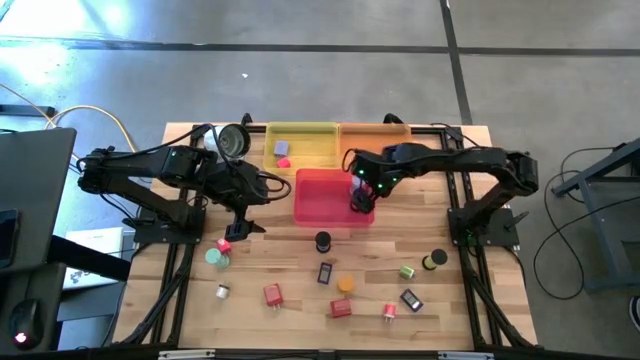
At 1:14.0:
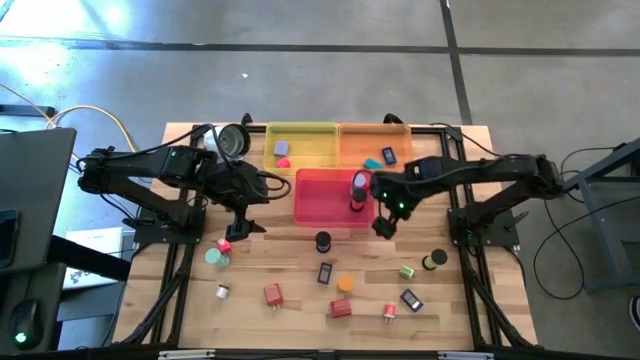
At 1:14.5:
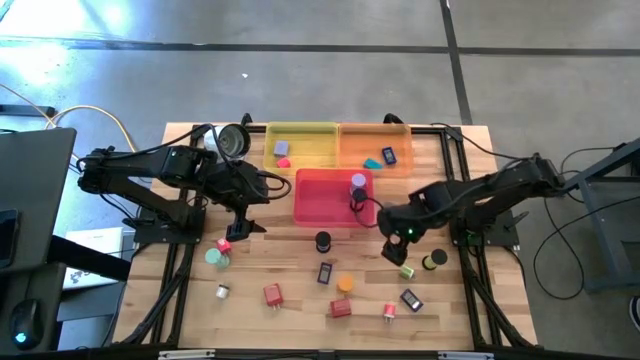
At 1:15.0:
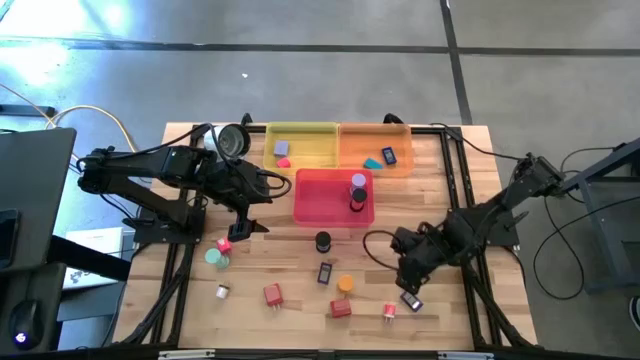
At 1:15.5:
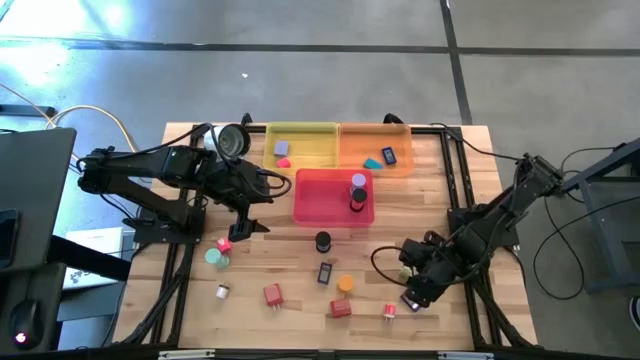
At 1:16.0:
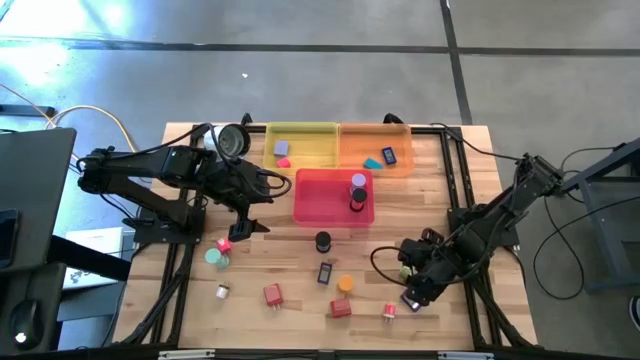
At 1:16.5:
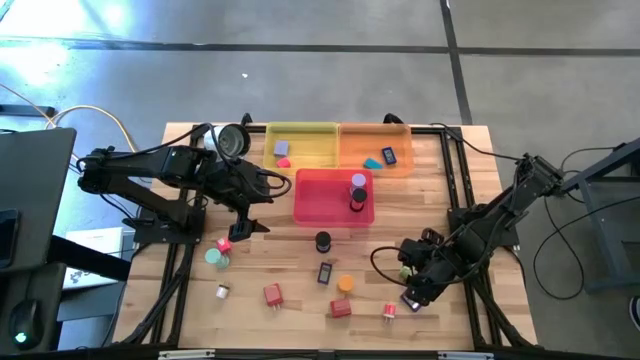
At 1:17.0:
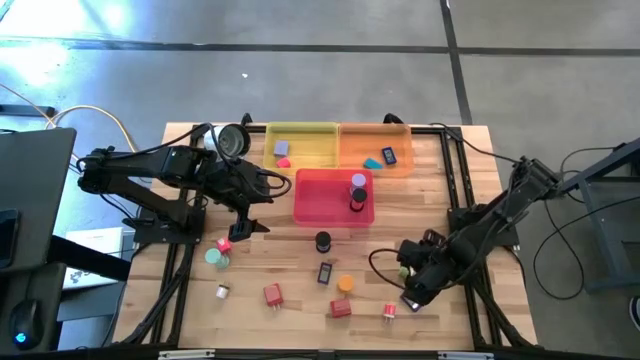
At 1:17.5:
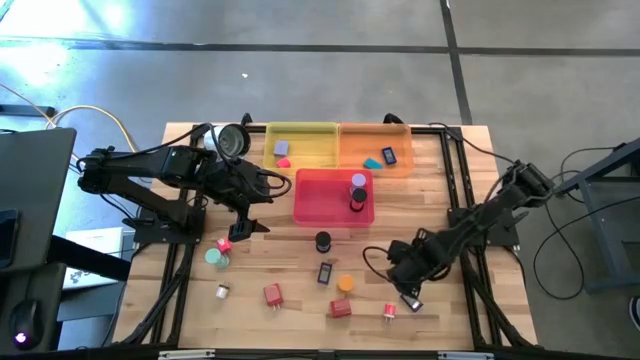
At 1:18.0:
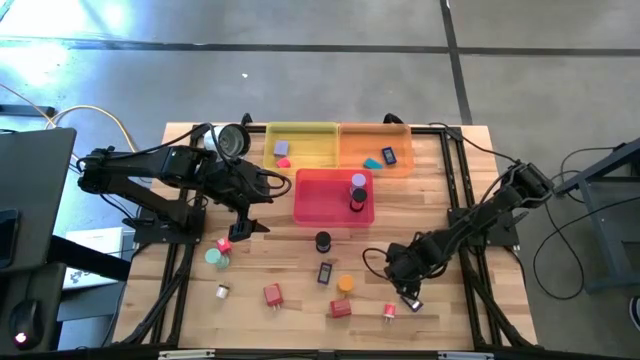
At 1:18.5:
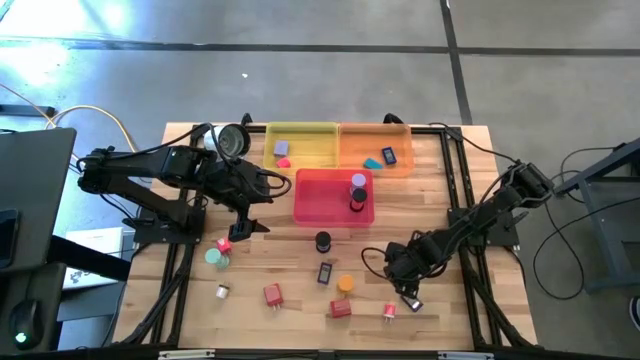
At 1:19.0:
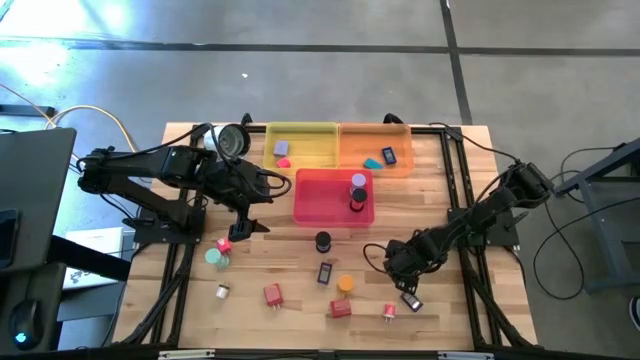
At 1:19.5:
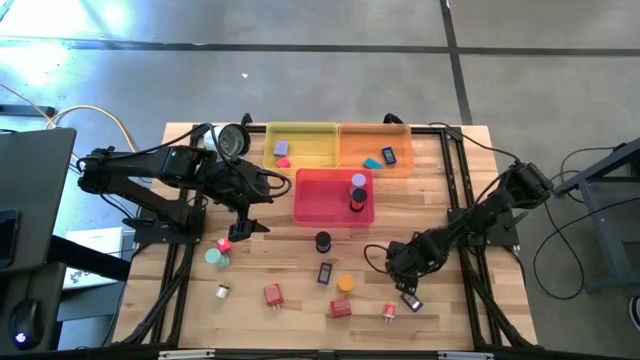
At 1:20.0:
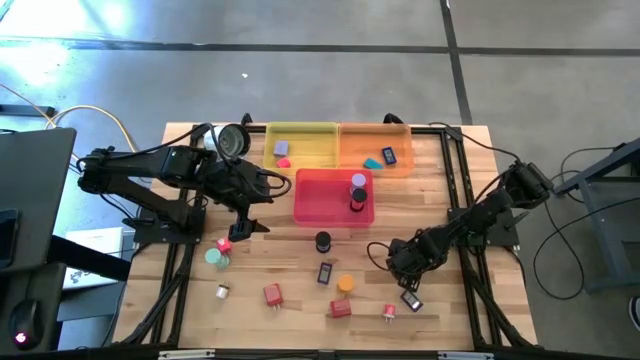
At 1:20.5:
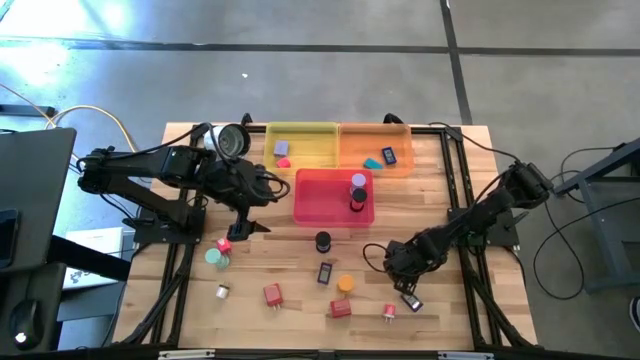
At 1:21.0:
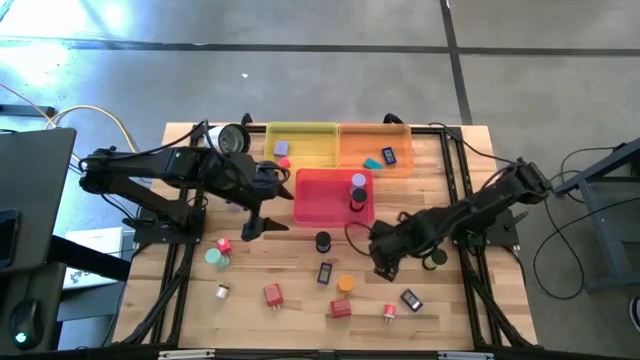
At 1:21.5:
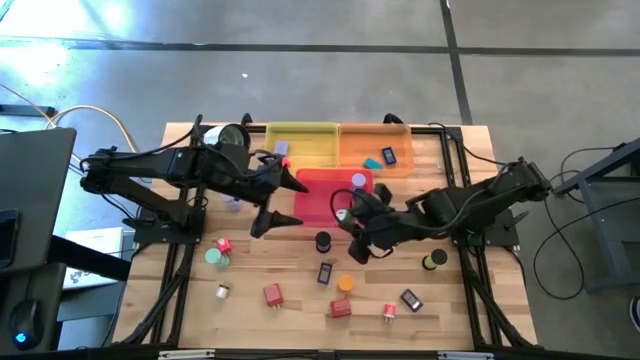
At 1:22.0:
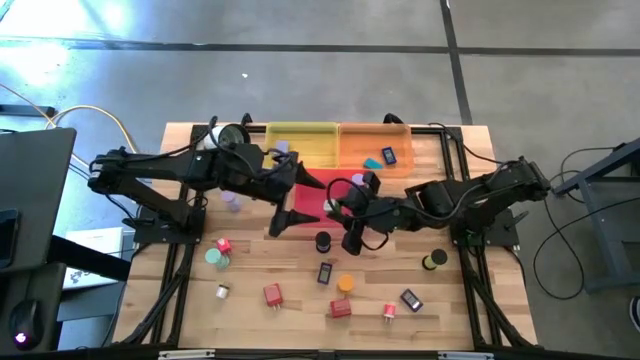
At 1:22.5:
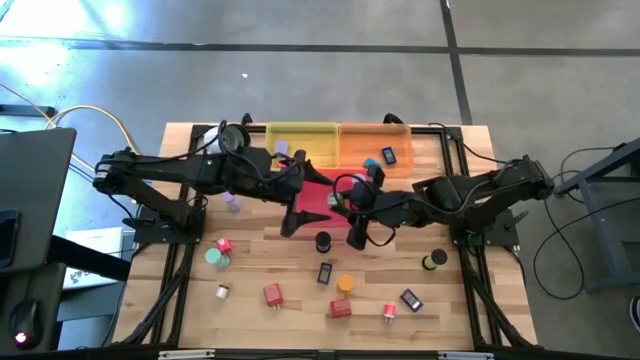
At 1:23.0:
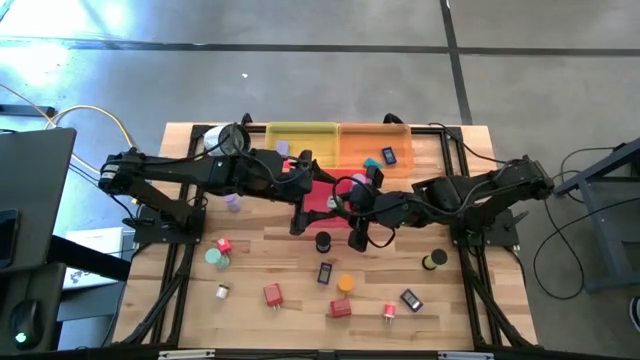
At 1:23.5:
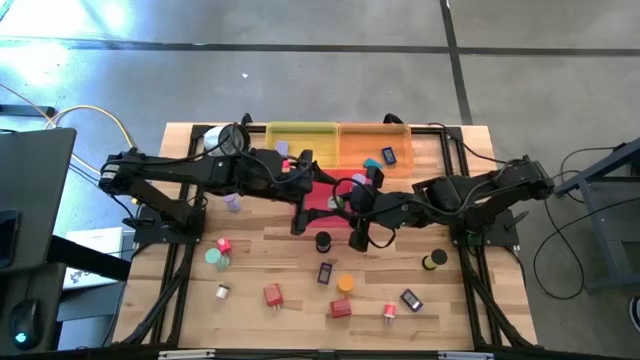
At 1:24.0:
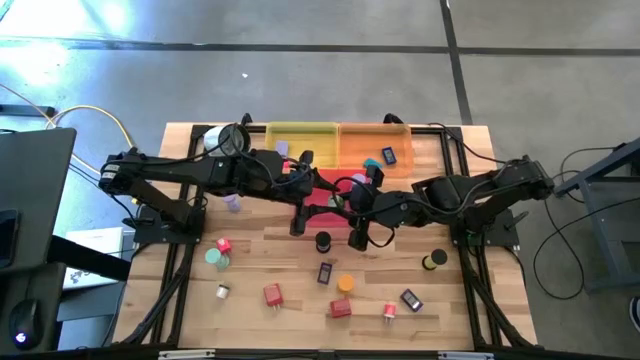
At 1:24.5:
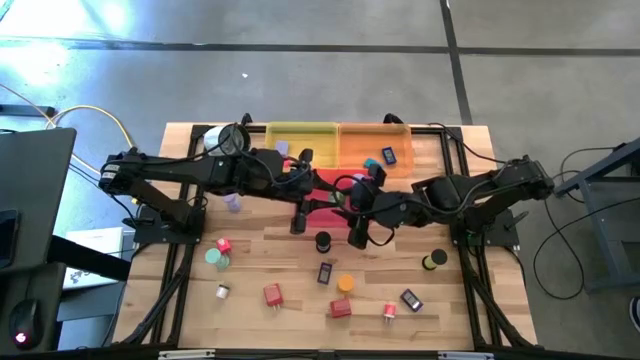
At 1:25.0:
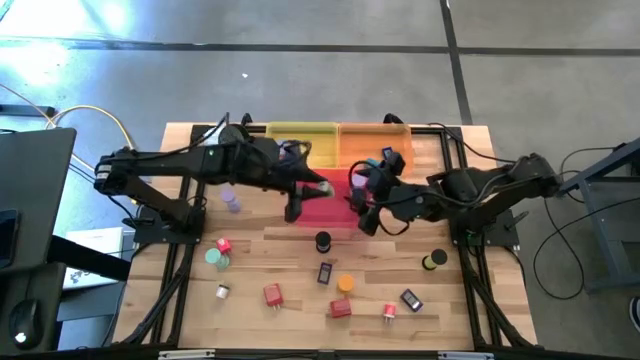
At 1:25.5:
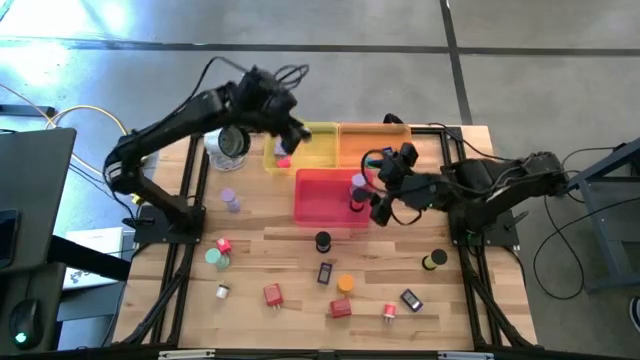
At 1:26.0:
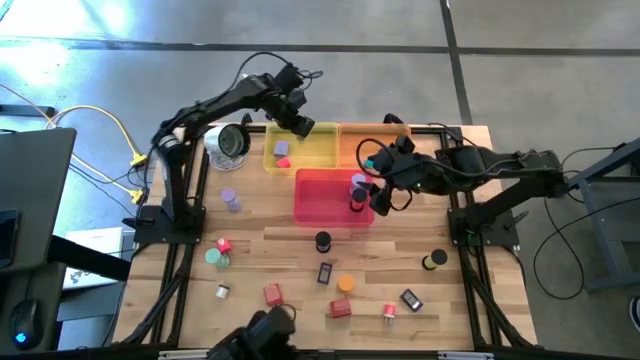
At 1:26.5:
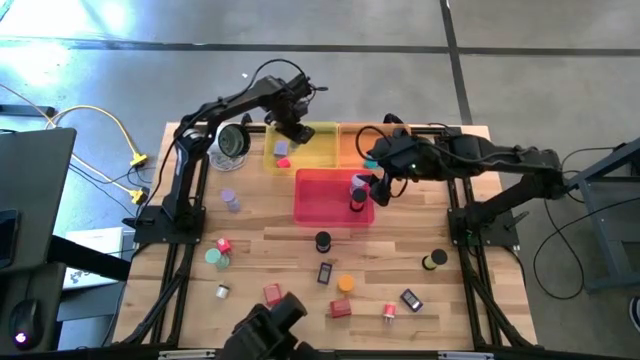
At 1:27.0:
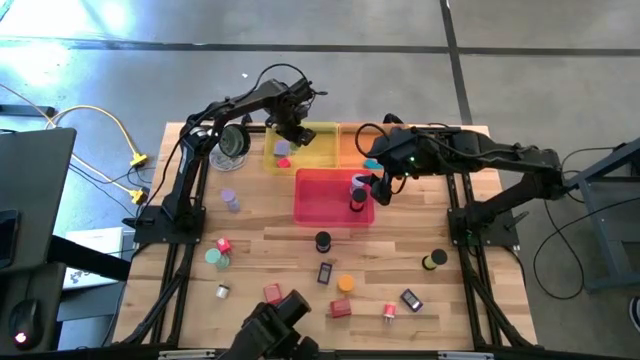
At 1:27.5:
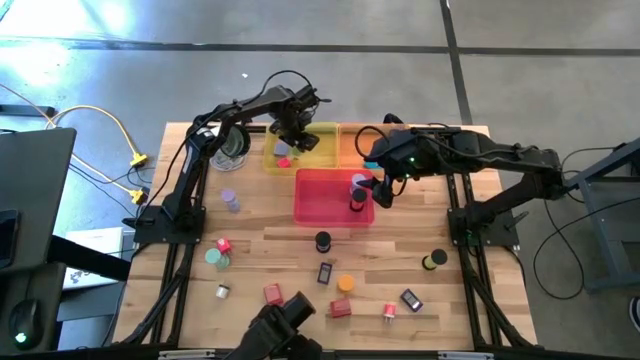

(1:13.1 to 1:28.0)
Task: Pick & Place Office items
Put the green charger adapter into the yellow bin

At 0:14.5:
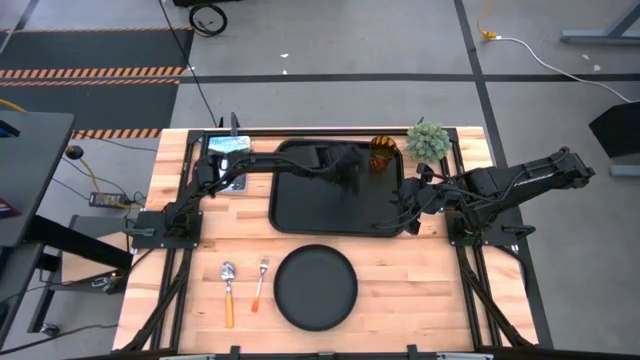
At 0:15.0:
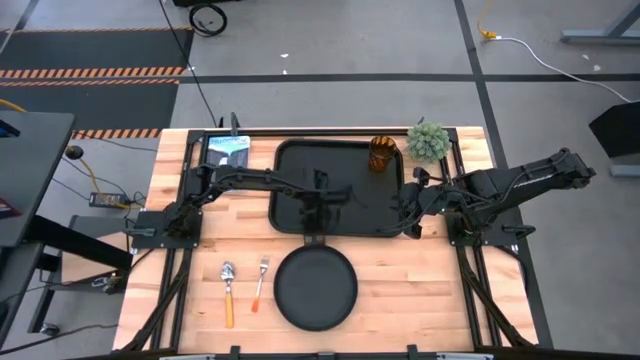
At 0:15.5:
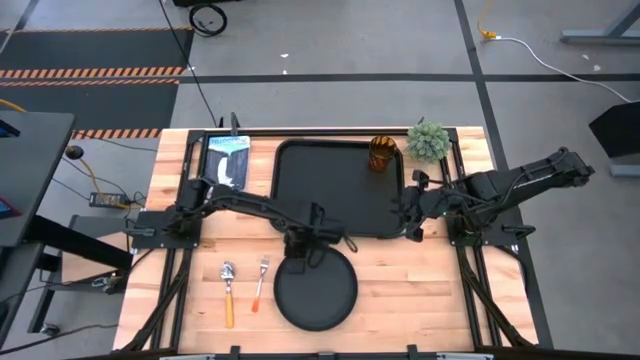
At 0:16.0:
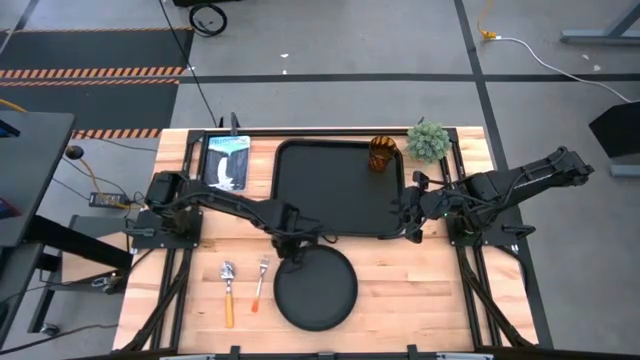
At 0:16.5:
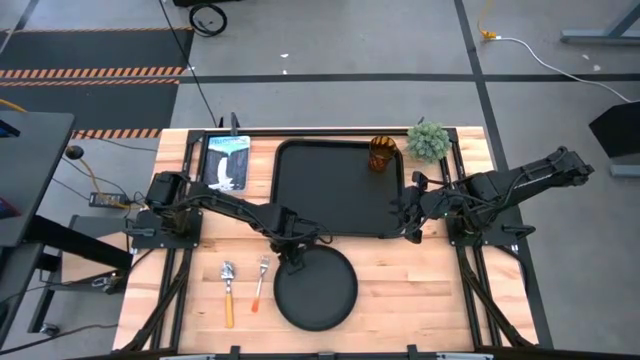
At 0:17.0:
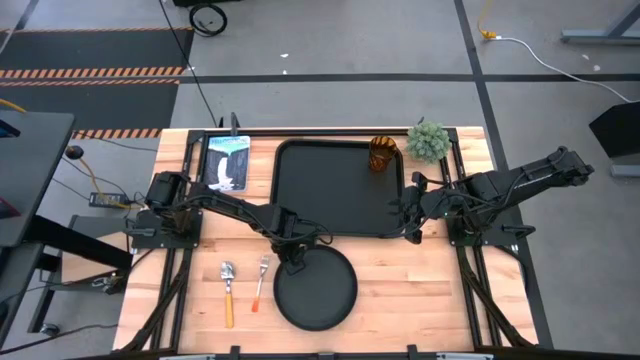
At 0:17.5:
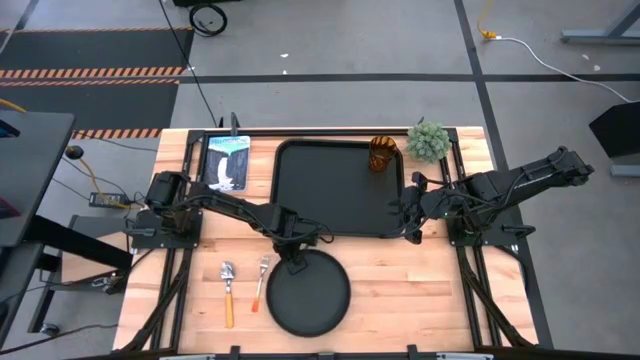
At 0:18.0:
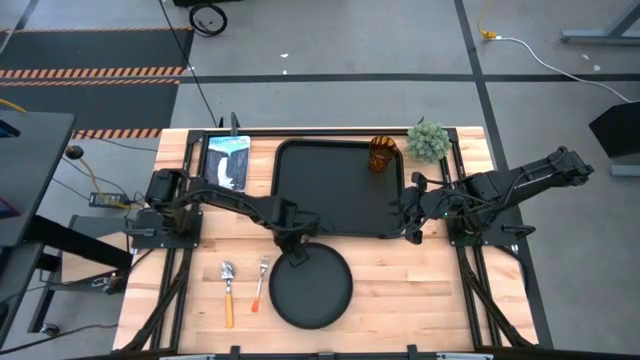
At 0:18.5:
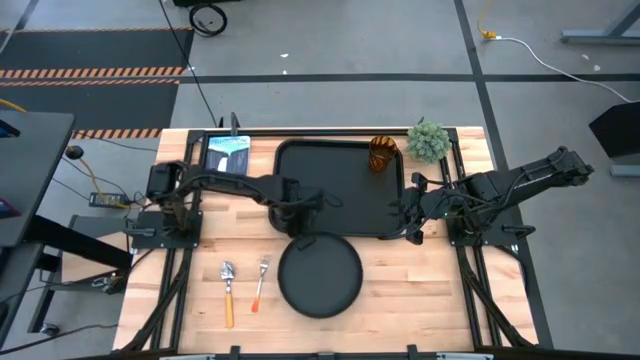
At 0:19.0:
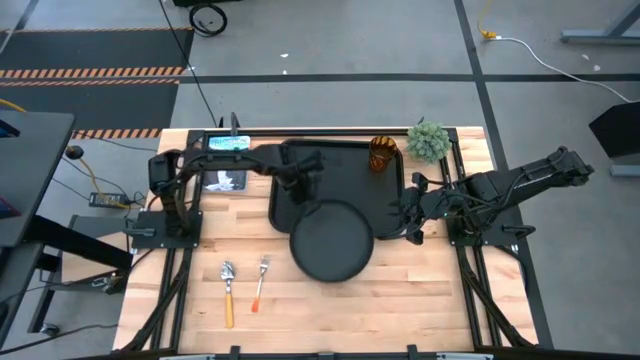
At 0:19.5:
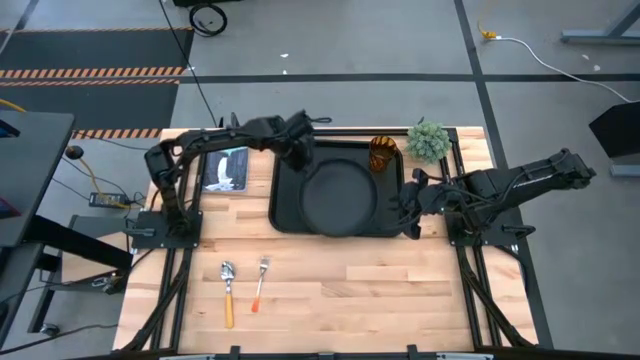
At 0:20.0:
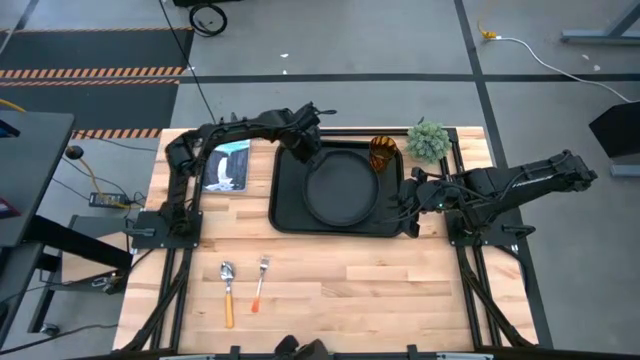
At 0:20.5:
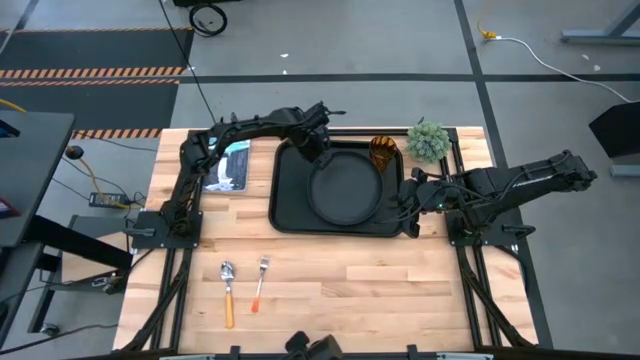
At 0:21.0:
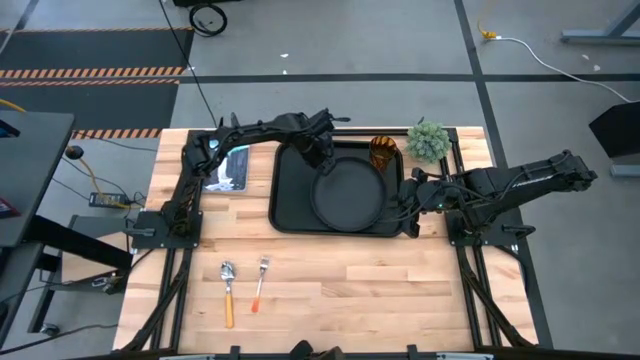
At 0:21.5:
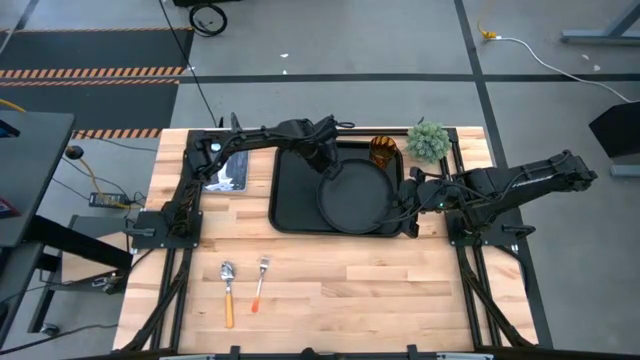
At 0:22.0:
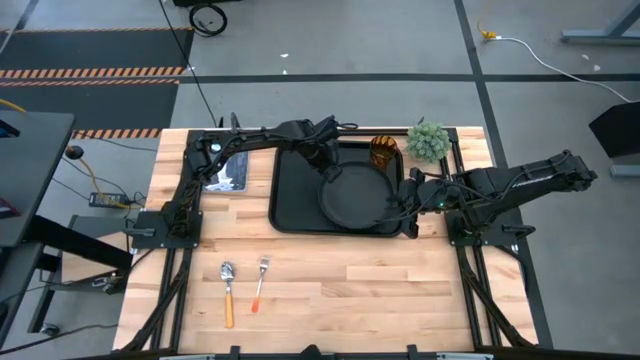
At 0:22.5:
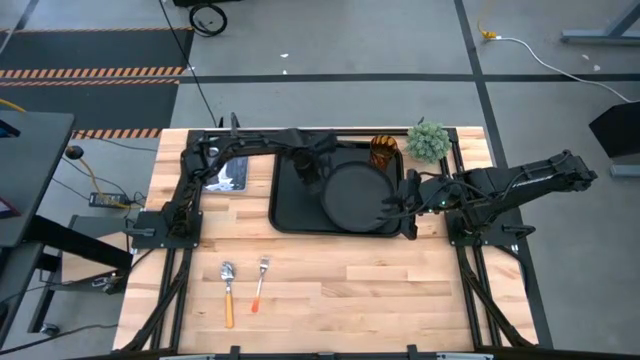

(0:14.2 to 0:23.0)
Task: Pick and place plate/cup/fork/spoon on tray
Put the black plate on the black tray to the bottom left of the orange cup
